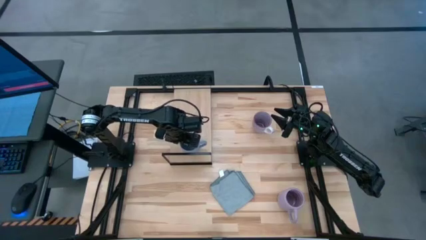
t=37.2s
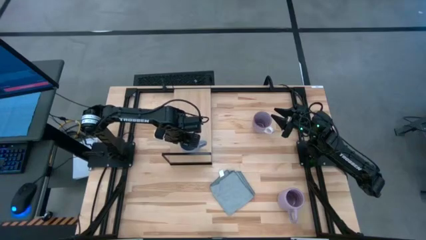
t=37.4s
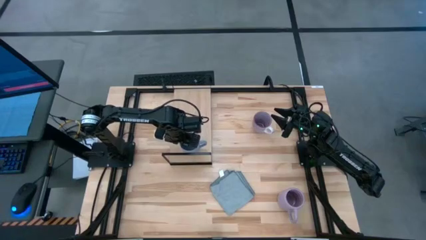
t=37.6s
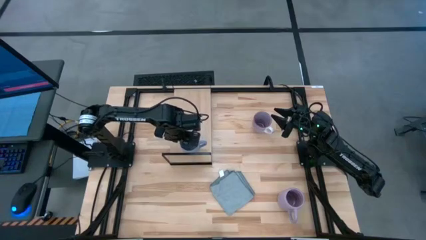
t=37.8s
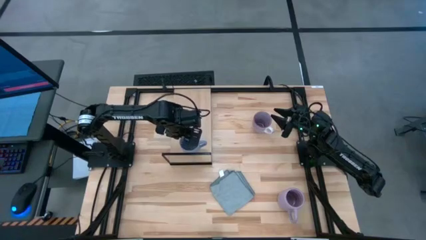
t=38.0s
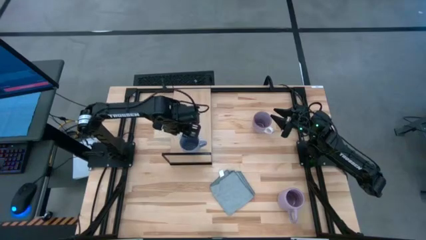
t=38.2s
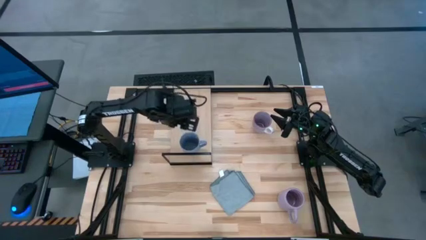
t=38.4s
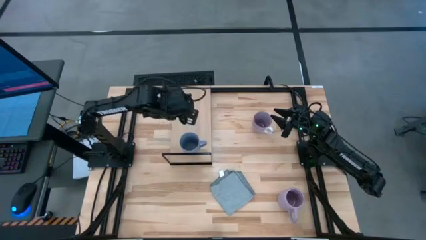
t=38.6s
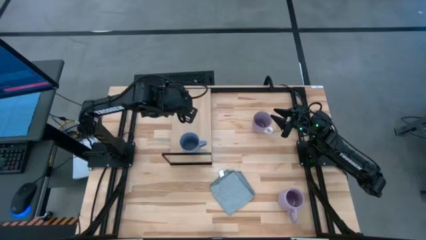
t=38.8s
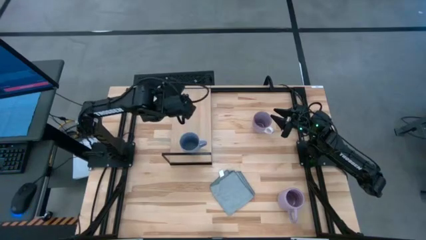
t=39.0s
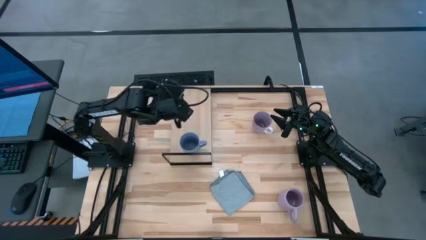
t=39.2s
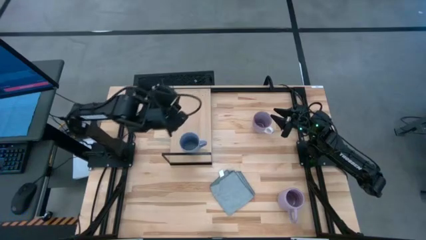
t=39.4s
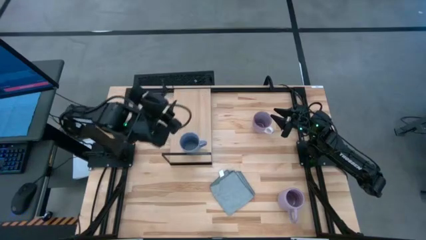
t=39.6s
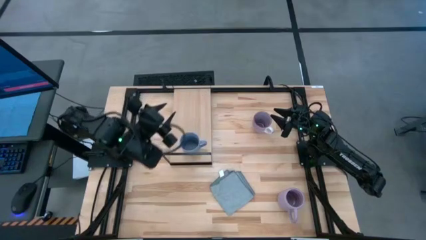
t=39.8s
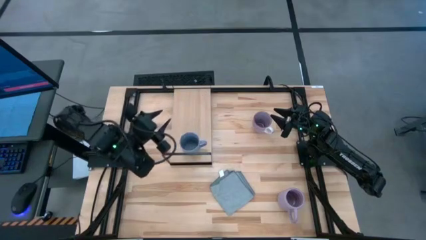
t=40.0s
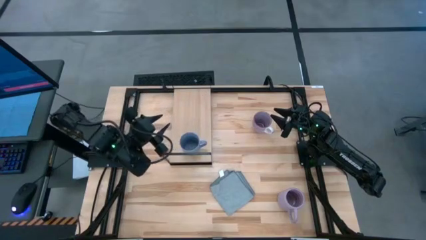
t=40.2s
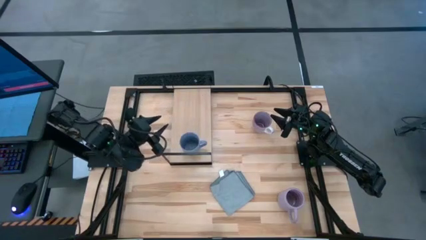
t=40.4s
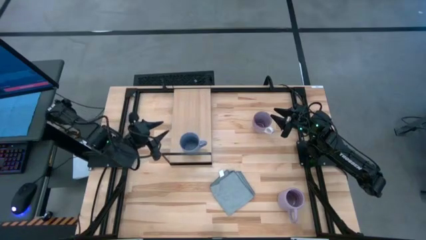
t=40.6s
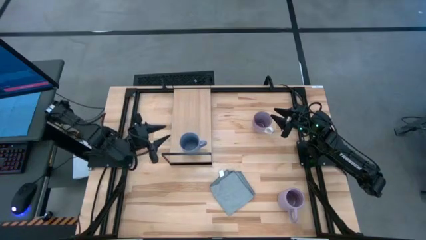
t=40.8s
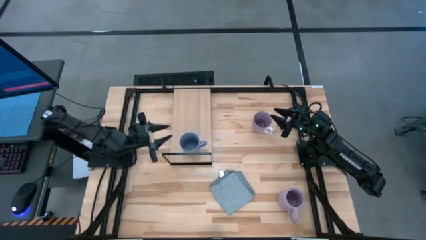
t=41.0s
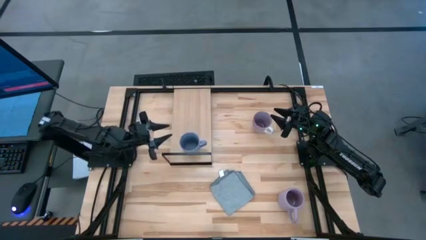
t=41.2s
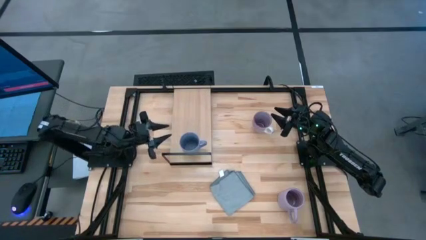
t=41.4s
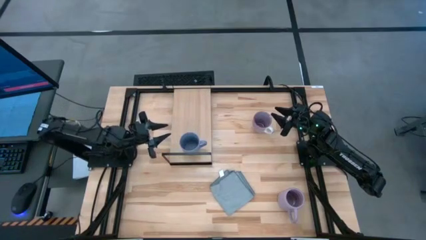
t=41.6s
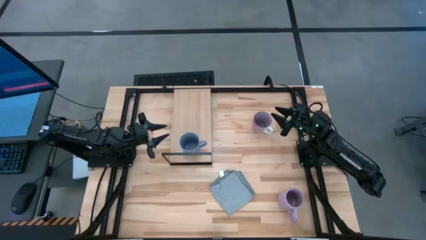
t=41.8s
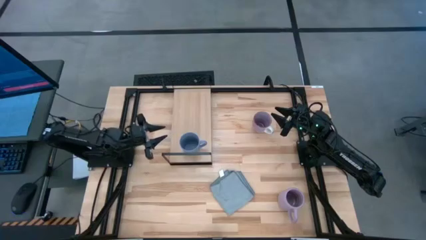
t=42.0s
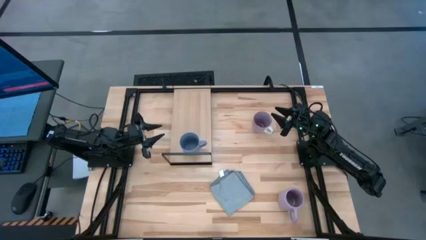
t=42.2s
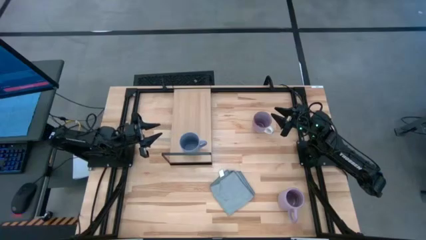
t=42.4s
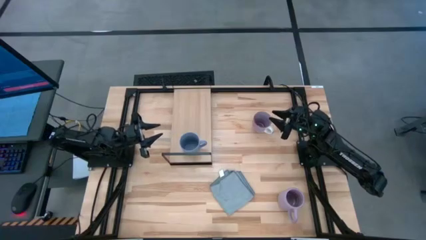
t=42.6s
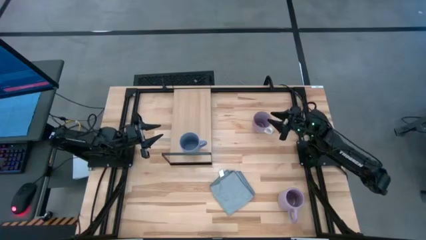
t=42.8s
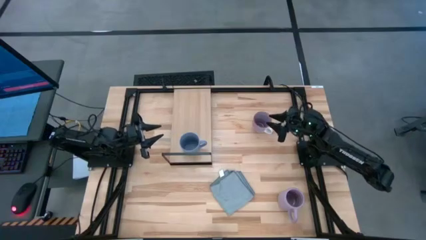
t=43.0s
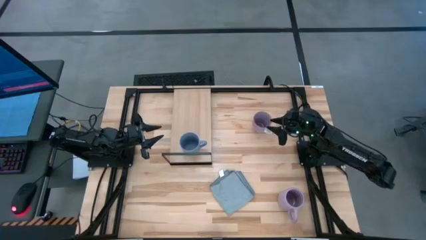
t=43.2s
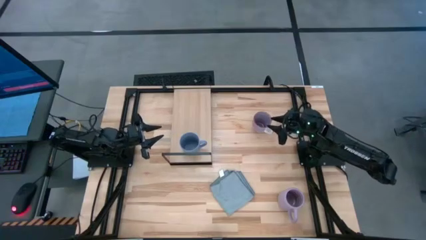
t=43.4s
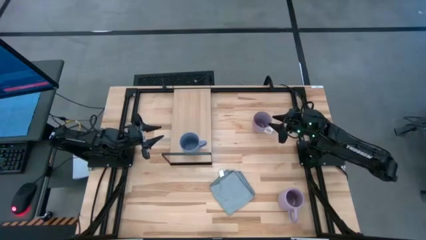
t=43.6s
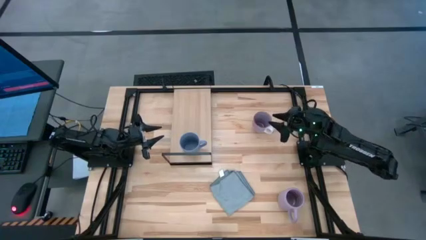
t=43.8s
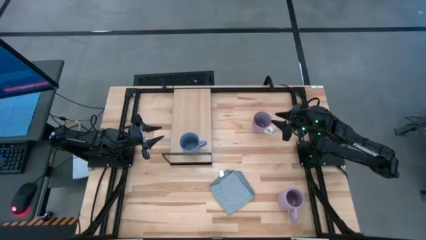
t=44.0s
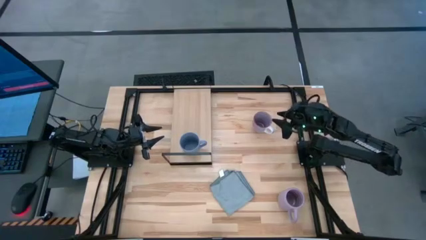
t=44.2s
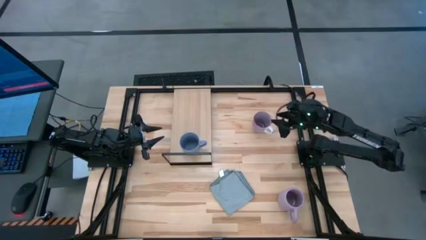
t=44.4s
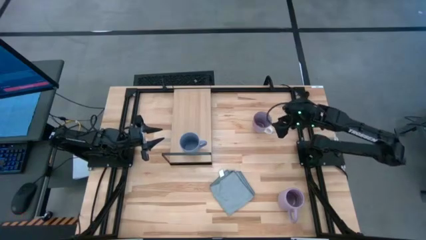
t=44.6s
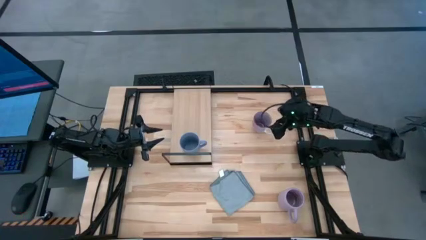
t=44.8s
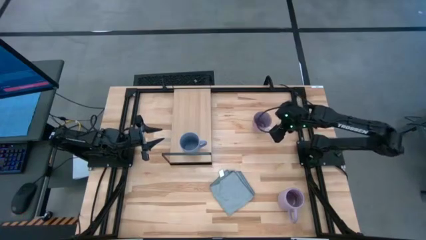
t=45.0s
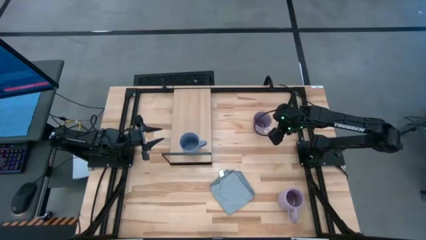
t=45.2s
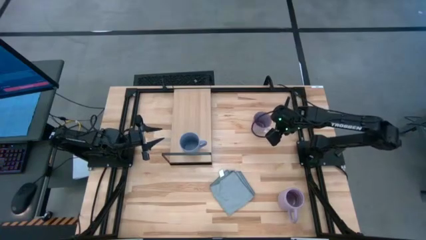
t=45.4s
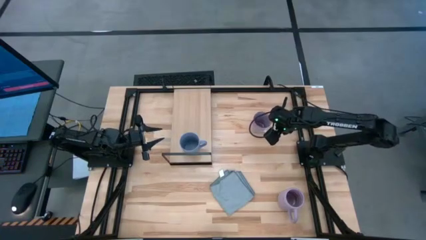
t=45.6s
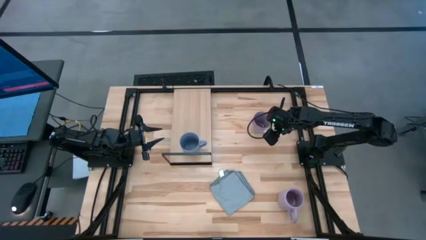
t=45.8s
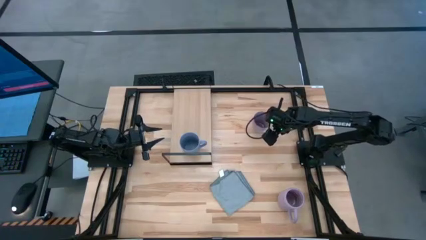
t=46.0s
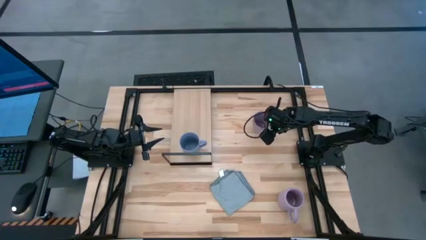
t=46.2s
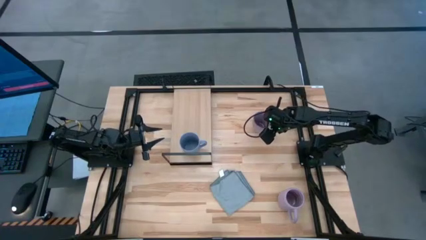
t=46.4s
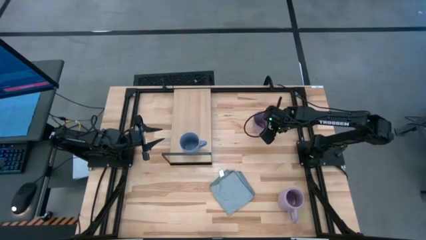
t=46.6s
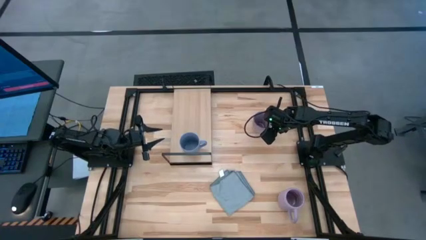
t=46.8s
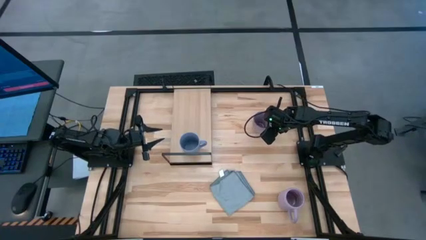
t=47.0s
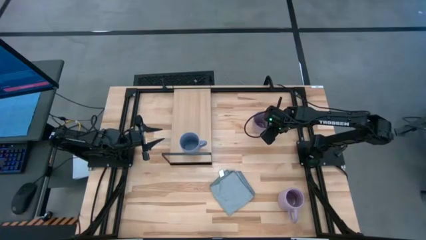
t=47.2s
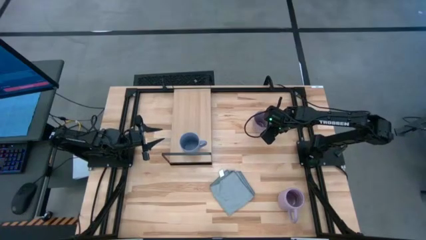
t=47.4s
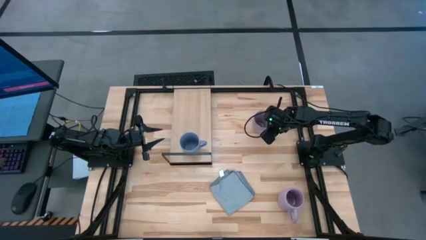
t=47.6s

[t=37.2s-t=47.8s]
Task: Stack small to large cups/mugs on shelf
Put the top light purple cup on the shelf
